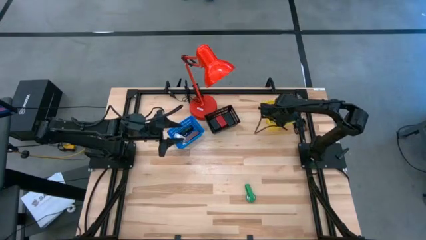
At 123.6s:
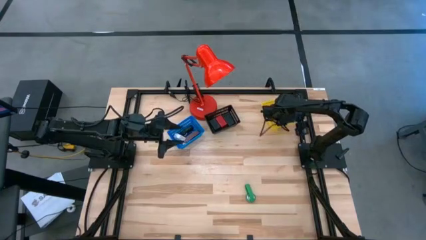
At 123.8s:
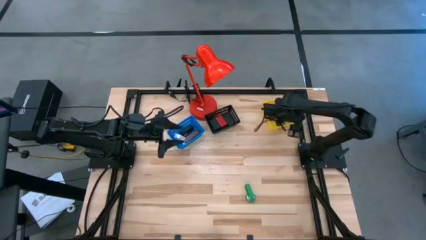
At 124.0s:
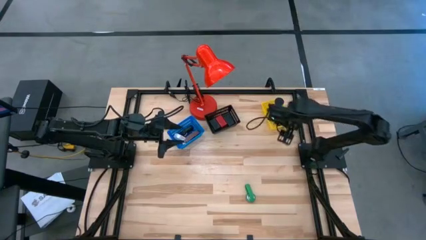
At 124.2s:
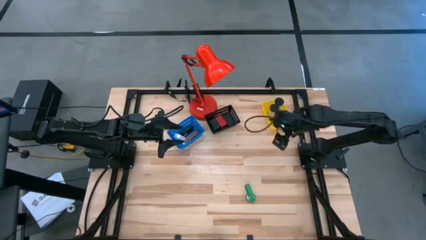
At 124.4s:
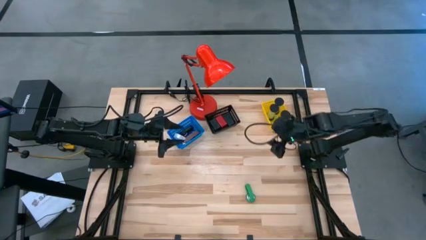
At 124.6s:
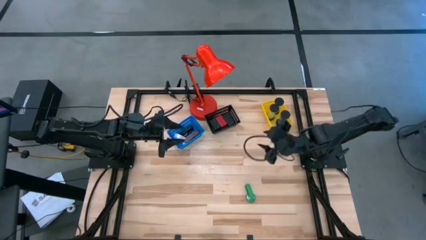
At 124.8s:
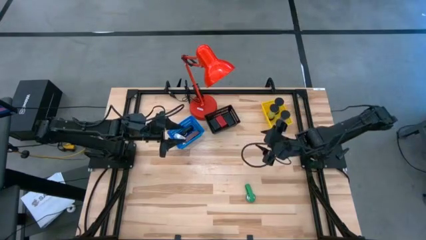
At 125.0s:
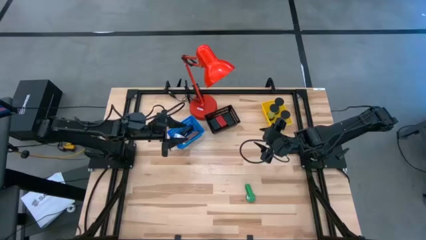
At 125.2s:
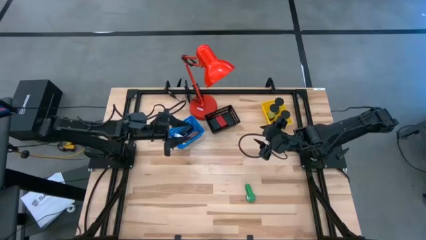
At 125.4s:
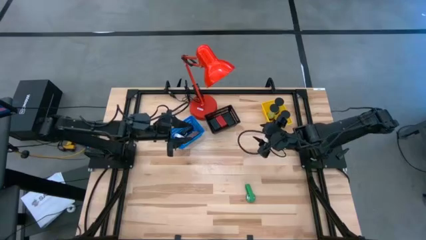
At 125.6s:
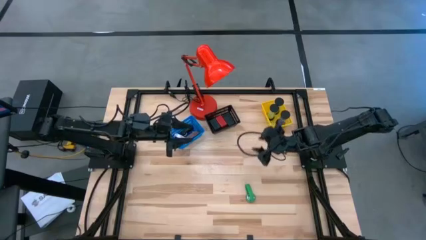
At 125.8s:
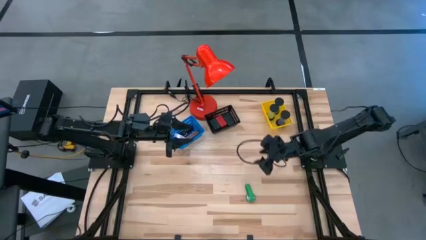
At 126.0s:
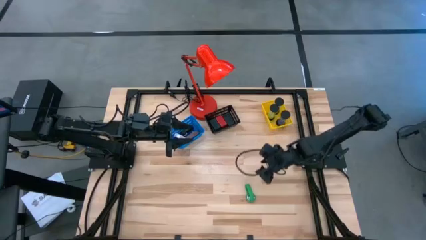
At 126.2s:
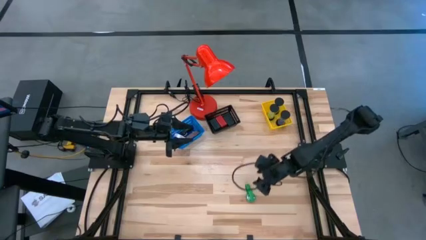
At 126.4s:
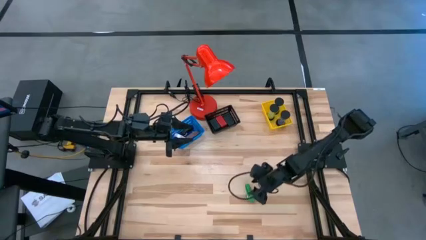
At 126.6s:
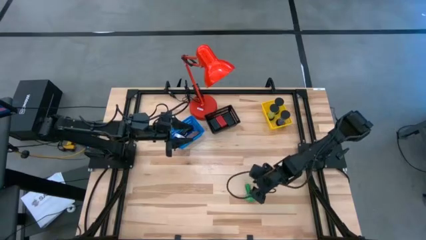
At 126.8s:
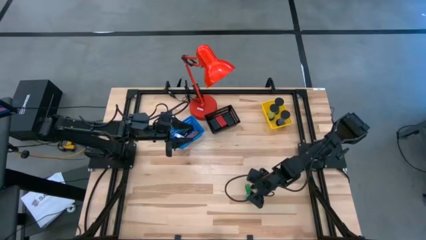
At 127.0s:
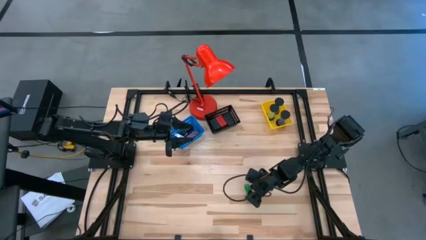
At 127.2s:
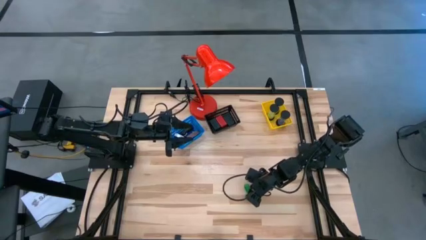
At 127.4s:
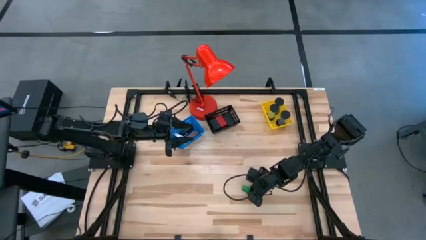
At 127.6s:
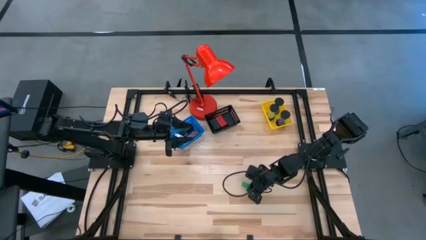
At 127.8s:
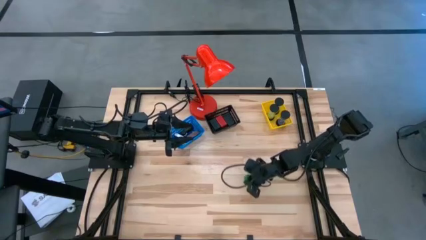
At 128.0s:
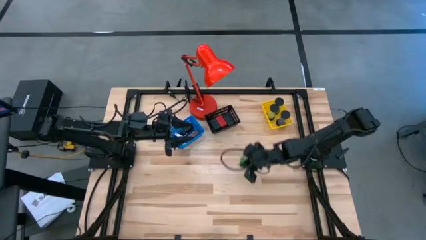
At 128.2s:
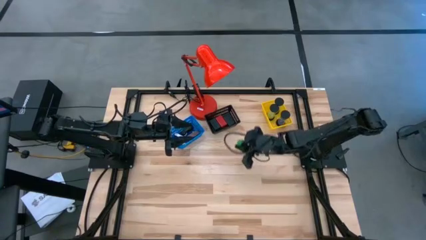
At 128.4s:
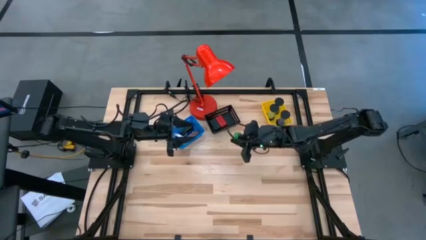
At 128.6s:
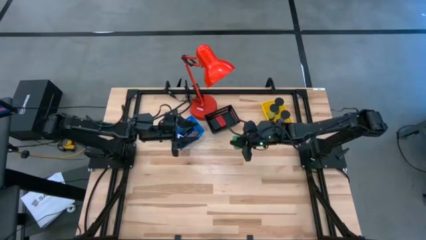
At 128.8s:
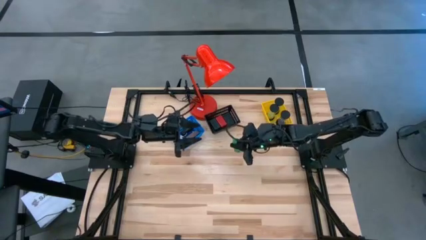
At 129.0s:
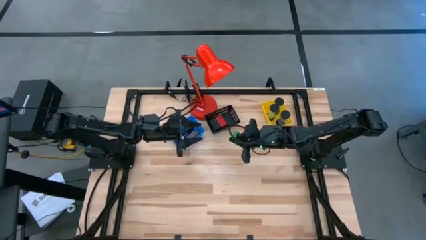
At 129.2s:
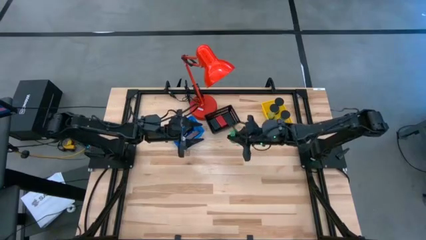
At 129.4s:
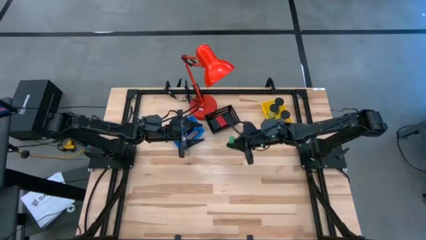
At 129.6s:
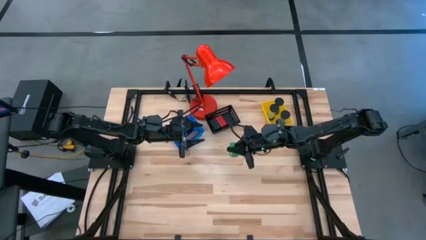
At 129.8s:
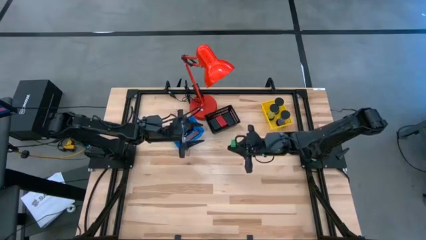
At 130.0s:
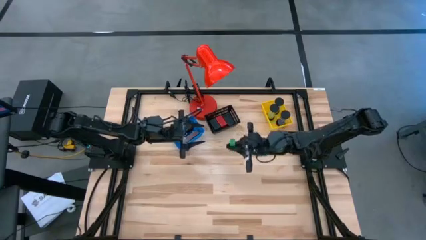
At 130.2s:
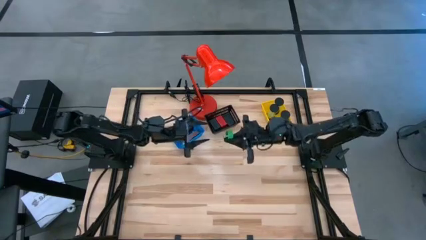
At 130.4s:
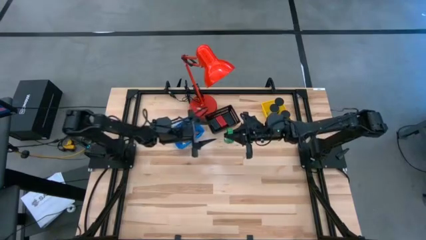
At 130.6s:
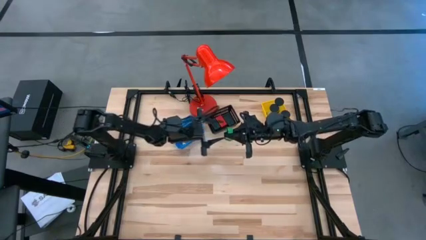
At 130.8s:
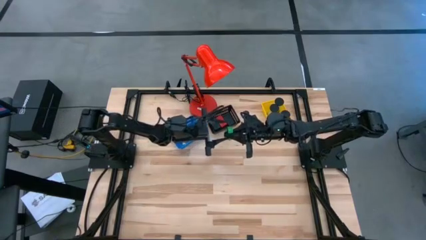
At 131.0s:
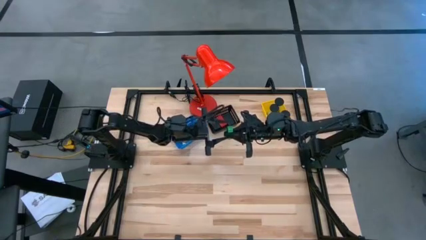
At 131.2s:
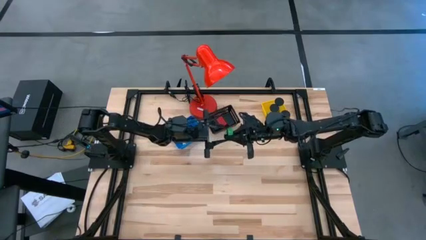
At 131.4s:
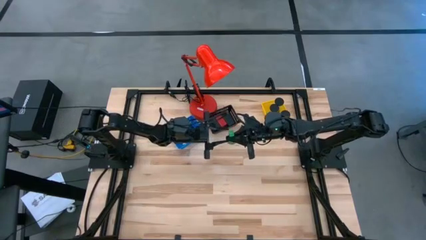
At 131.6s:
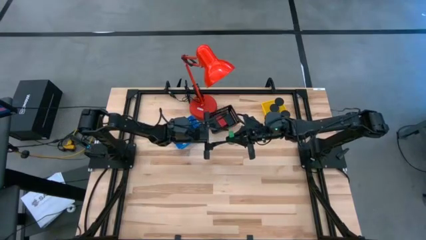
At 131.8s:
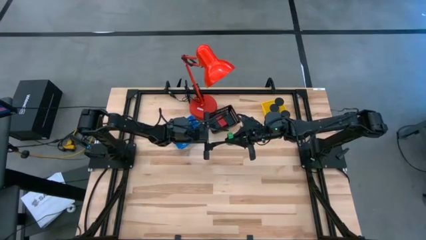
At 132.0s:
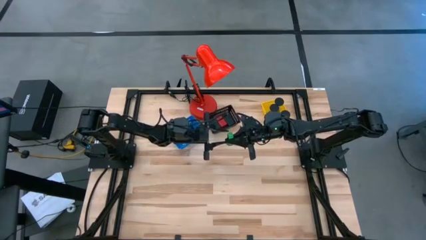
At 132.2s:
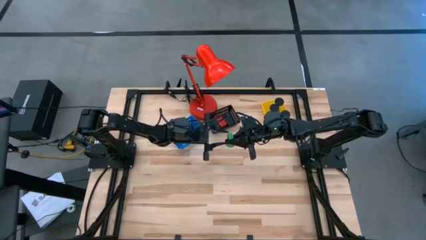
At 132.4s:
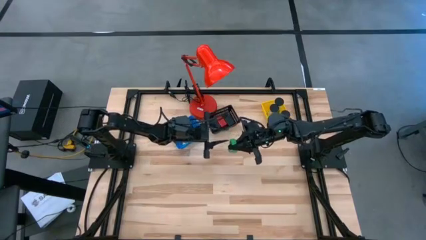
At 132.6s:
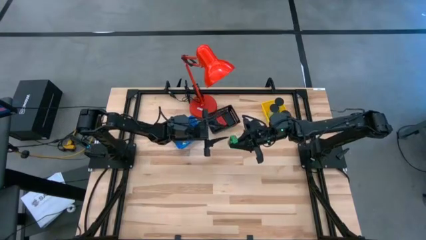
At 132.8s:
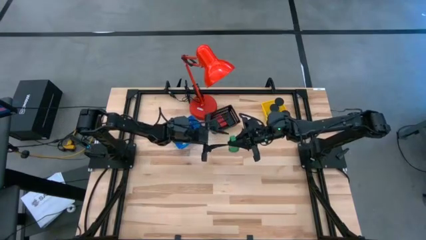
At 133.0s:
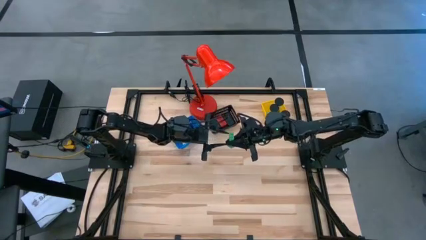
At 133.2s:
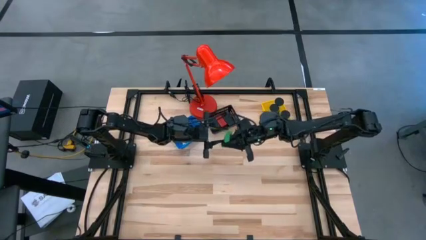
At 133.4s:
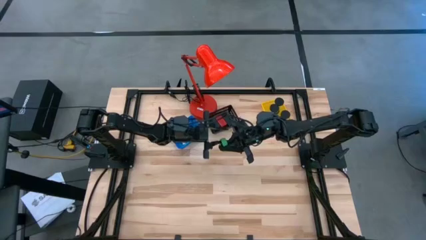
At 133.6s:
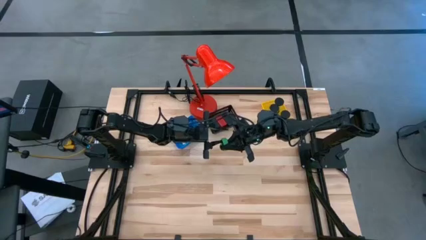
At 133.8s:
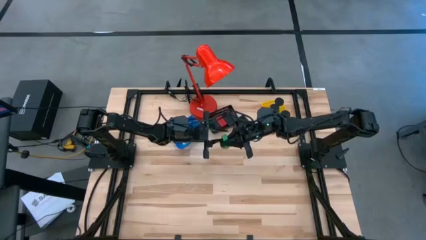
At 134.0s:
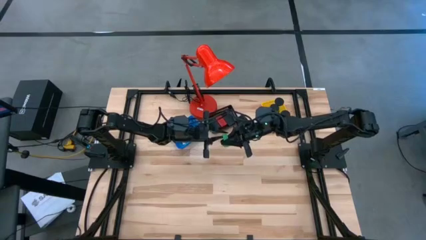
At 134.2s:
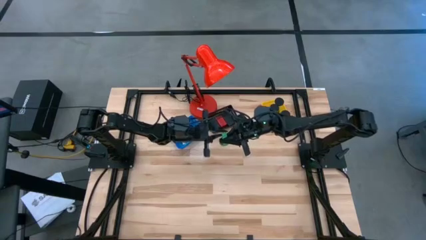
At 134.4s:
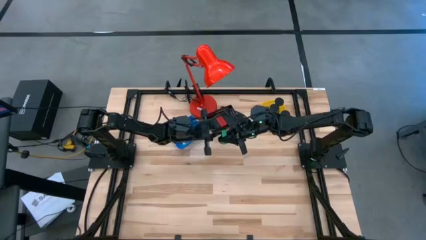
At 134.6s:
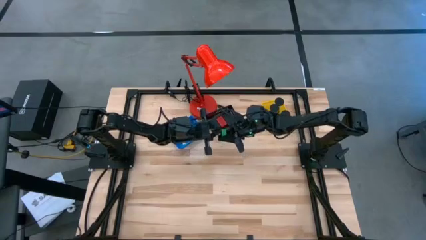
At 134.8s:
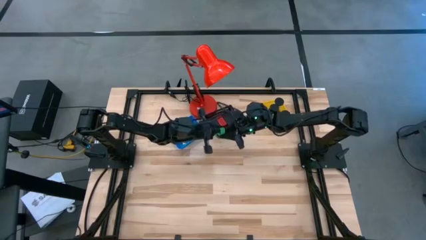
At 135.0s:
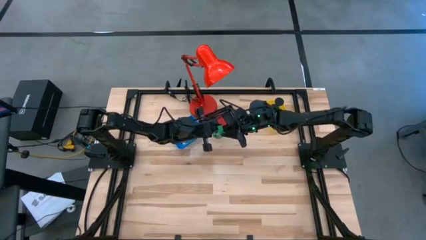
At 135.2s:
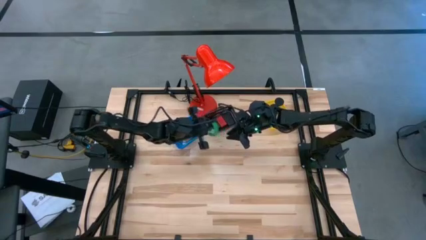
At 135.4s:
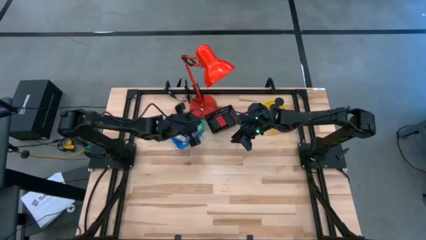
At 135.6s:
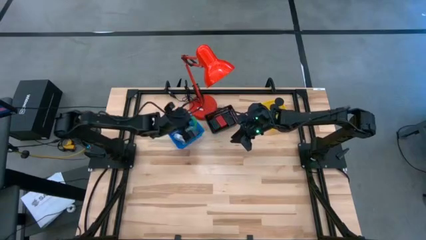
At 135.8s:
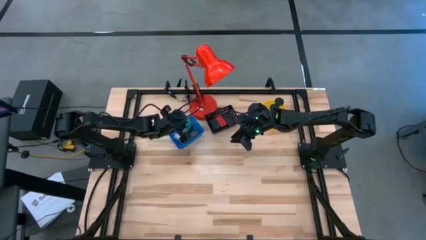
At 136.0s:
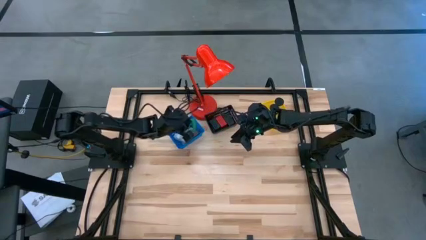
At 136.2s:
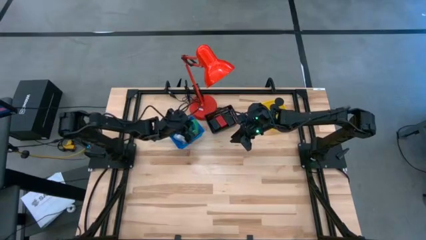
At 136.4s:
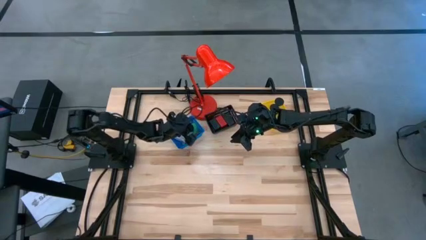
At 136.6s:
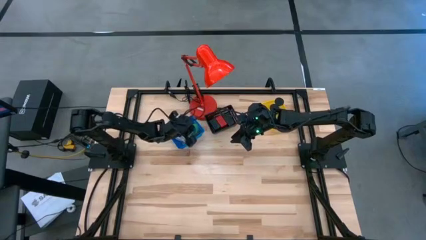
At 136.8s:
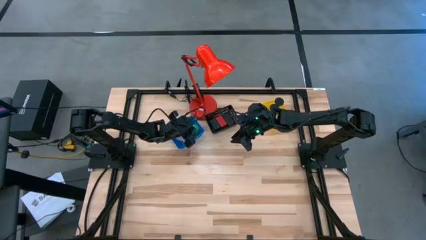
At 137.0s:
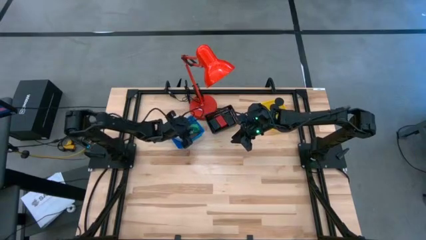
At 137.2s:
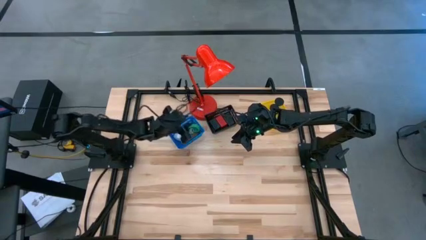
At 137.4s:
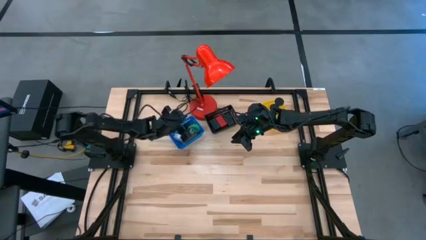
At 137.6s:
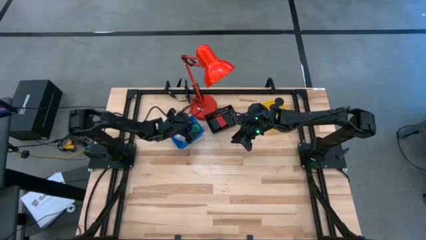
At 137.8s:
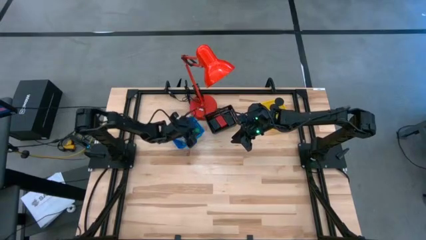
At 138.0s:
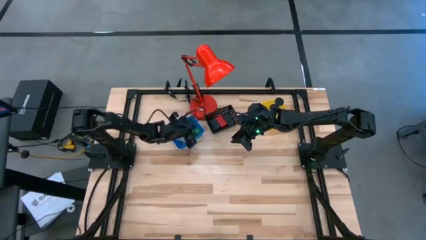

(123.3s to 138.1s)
Task: Pick & Place Office items
Put the green wristwatch into the blue bin

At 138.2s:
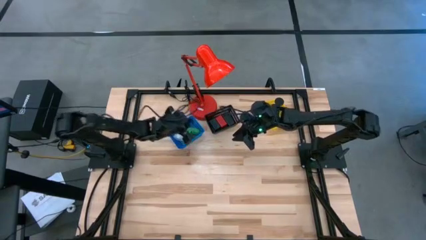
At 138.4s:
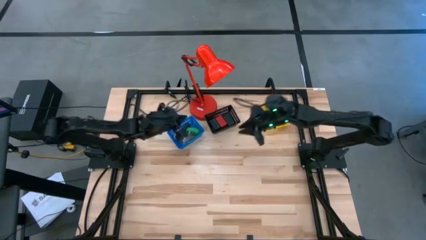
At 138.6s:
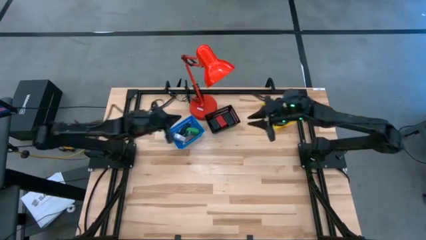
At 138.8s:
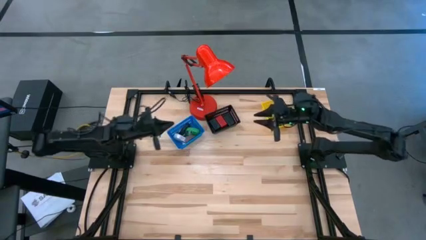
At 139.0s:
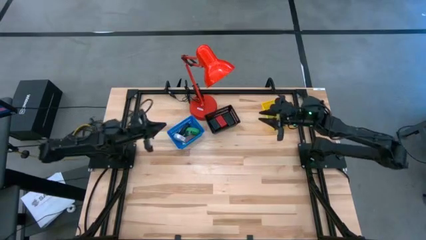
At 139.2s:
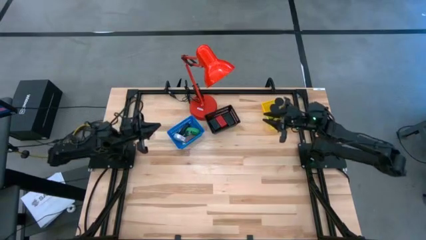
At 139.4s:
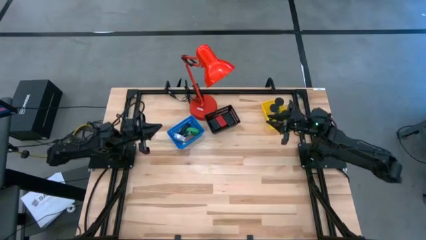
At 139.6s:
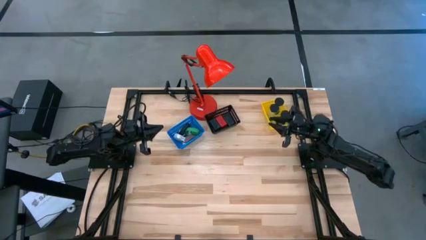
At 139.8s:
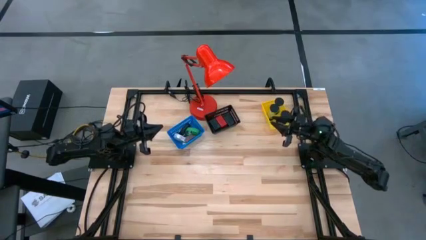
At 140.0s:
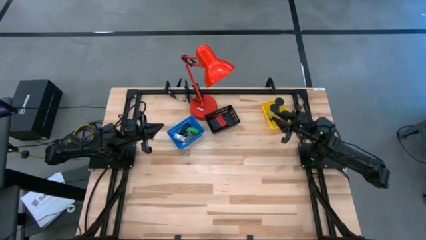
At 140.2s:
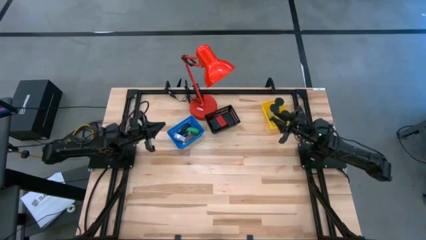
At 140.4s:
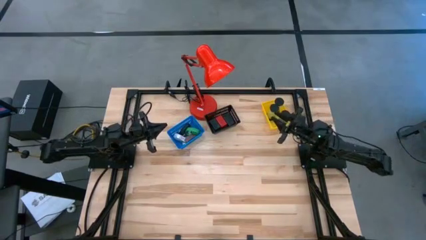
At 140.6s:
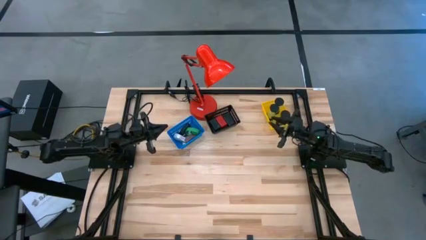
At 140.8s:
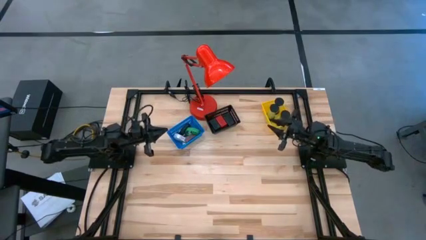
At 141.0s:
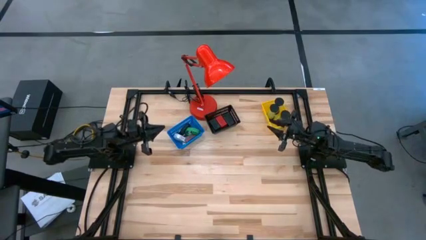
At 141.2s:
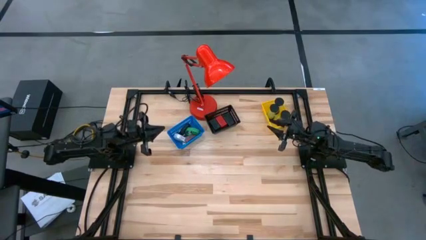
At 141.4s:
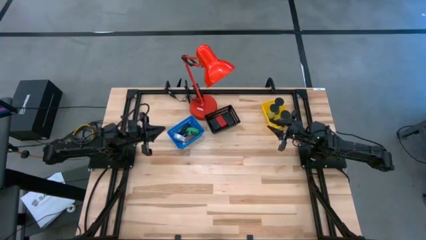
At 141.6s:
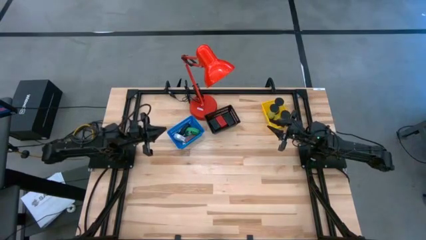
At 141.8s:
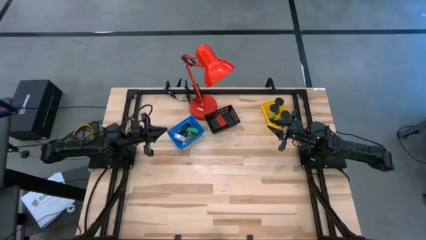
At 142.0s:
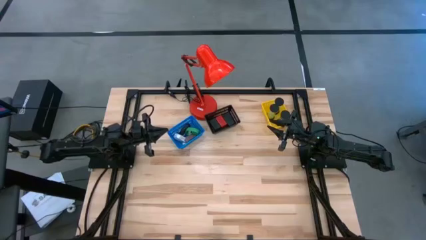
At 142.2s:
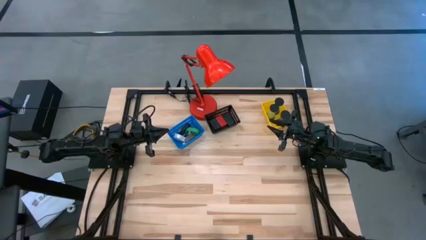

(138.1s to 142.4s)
Return to Home Position
